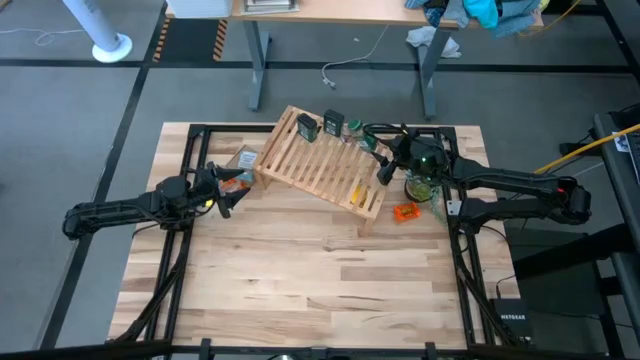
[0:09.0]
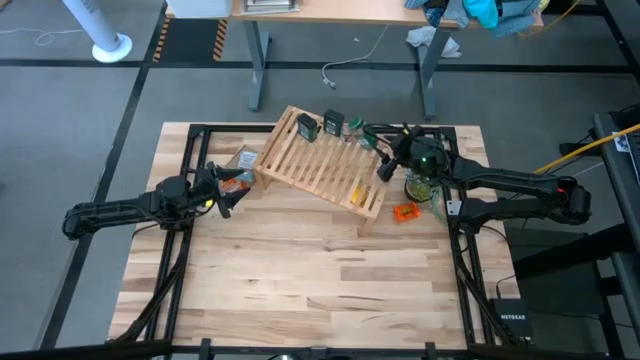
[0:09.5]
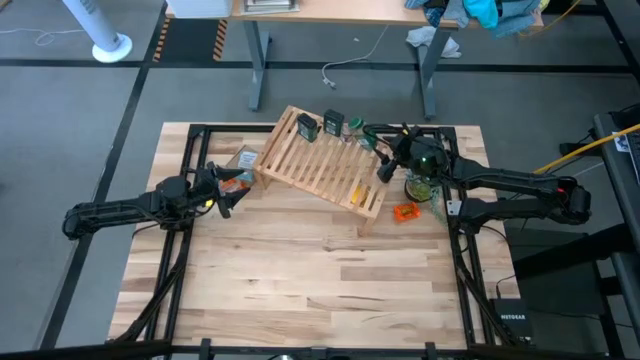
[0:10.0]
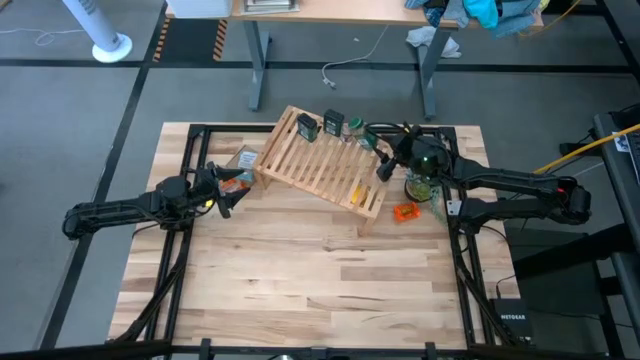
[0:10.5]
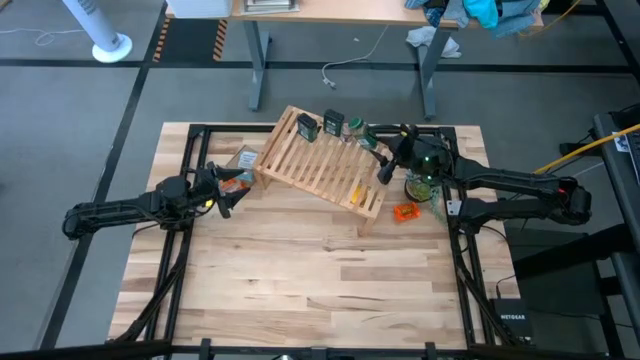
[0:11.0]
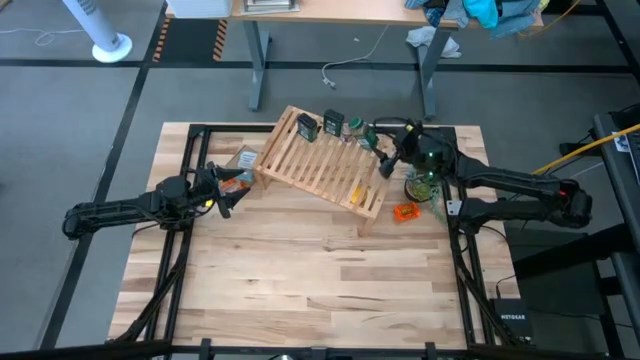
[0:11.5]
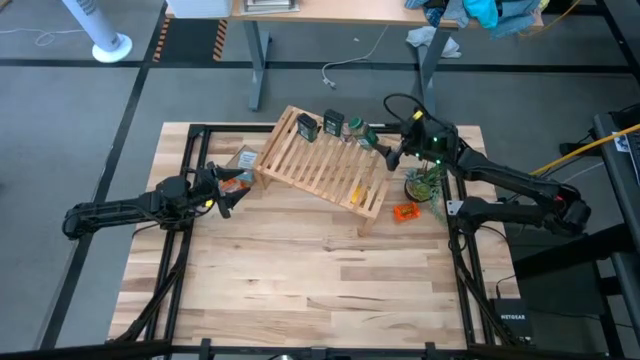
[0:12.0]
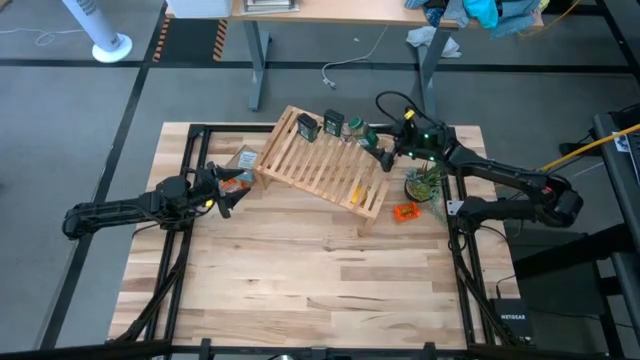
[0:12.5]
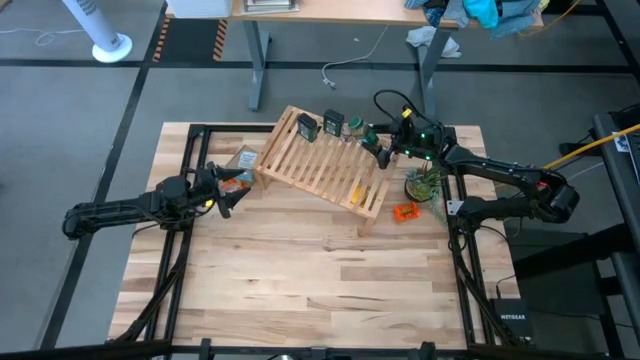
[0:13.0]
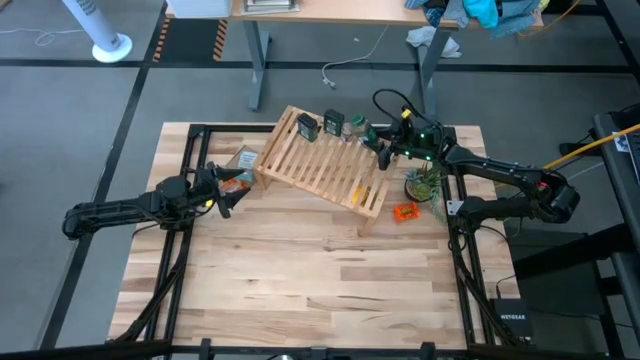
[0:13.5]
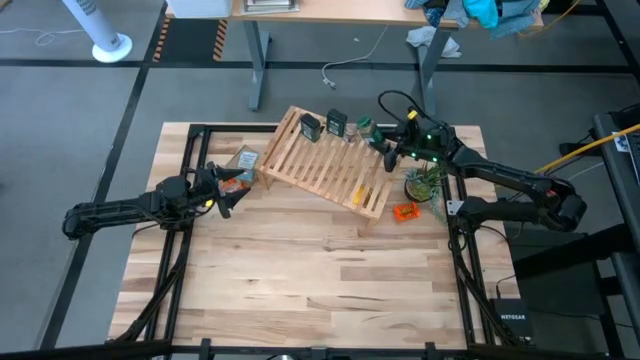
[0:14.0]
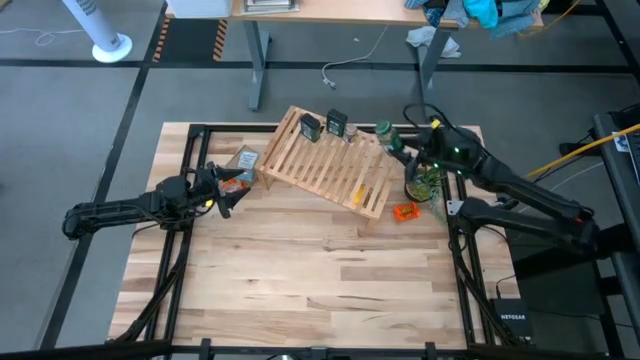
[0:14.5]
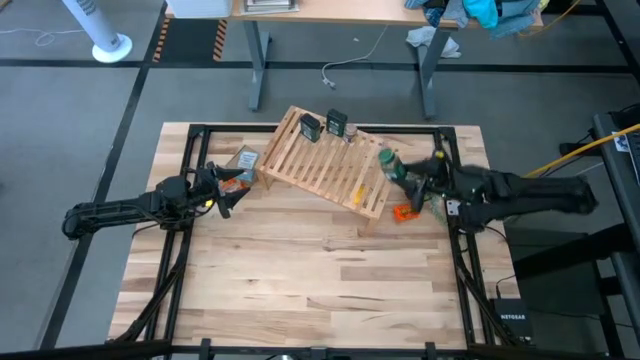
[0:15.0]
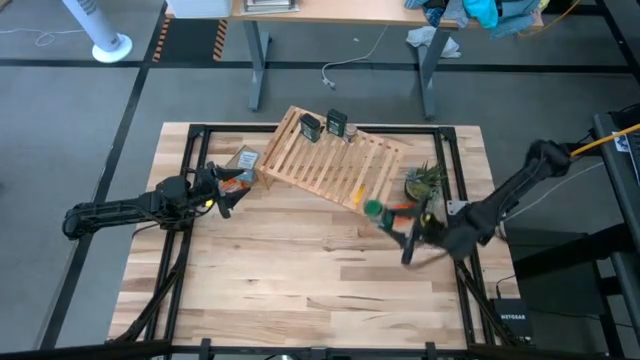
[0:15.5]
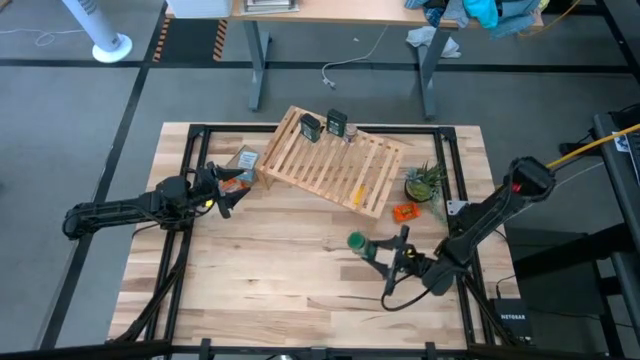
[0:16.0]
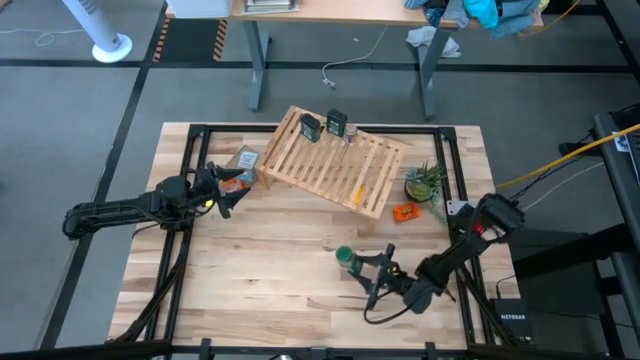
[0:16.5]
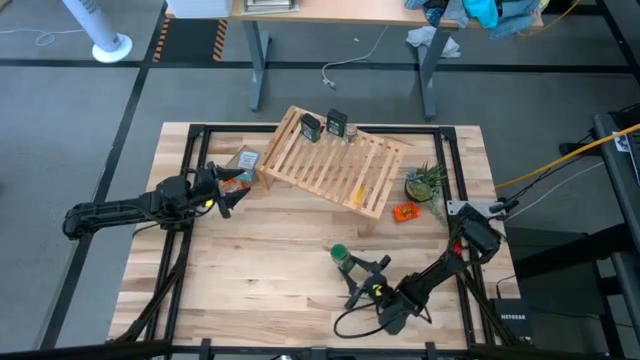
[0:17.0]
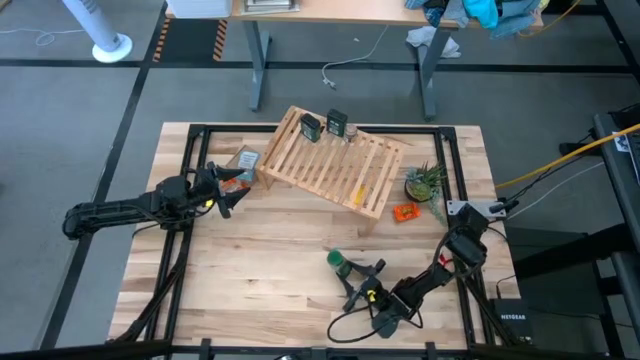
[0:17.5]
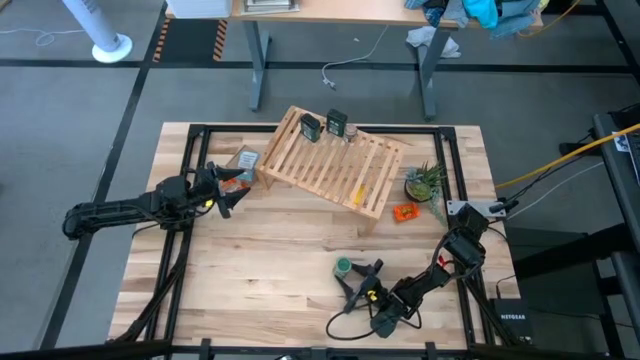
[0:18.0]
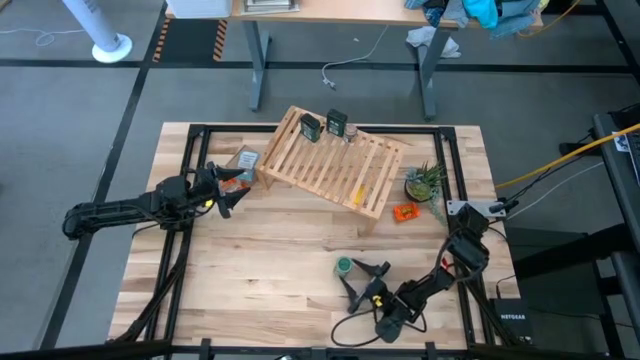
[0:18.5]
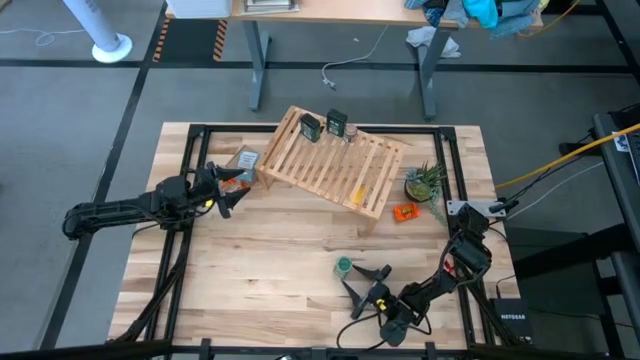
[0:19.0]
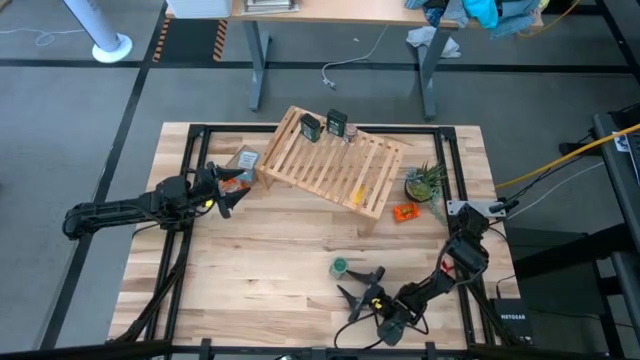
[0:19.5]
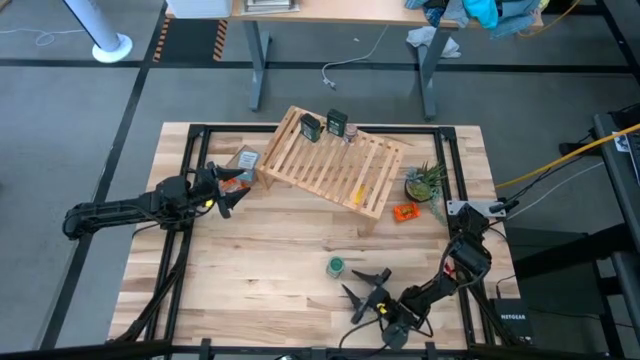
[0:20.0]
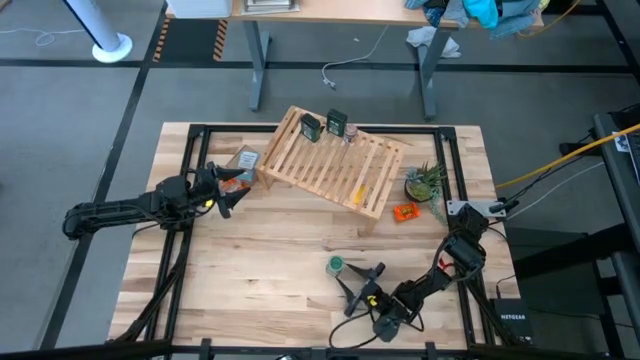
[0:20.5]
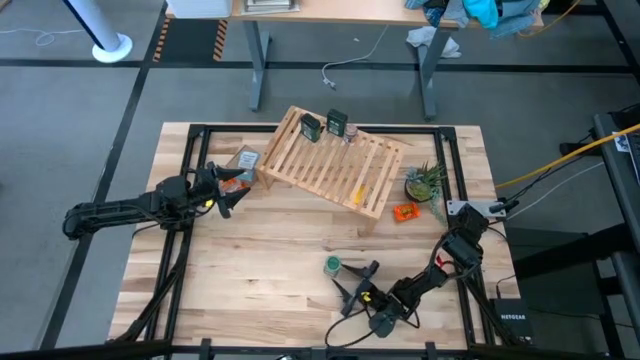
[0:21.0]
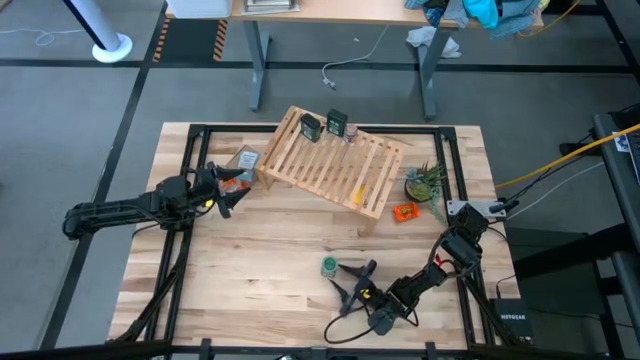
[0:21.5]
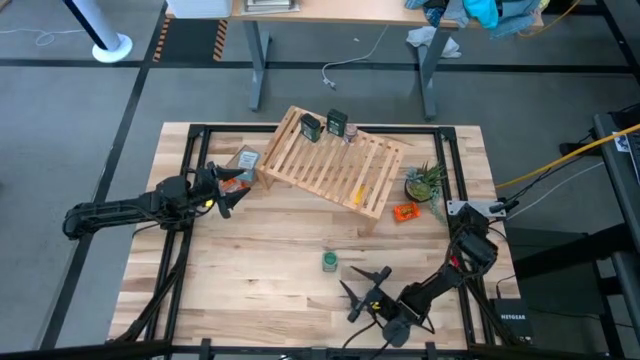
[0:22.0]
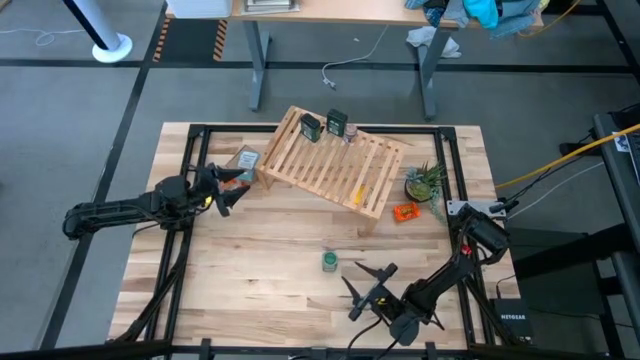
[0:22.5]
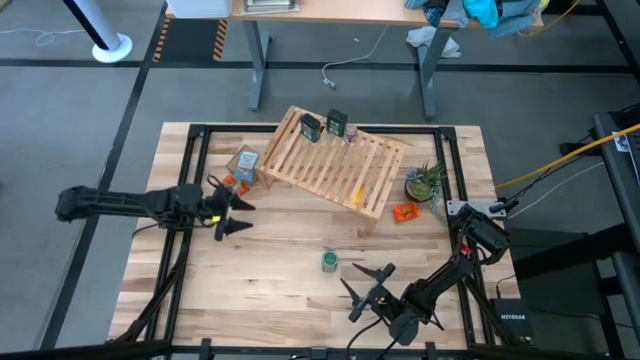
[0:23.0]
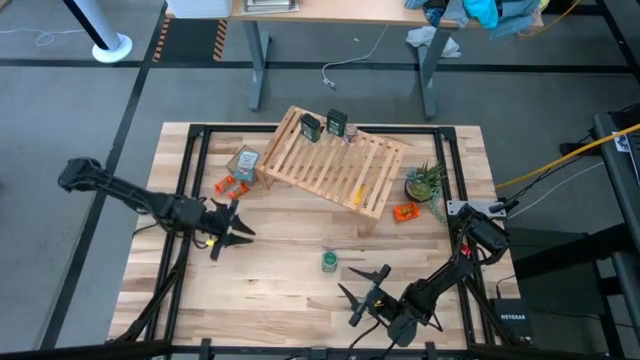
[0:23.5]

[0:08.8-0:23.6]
Task: Shelf spices
Remove the green seasoning bottle from the shelf

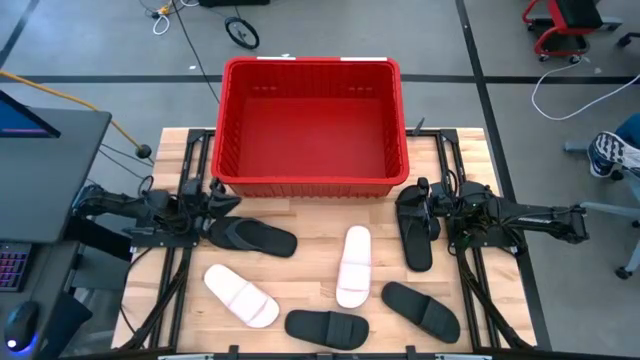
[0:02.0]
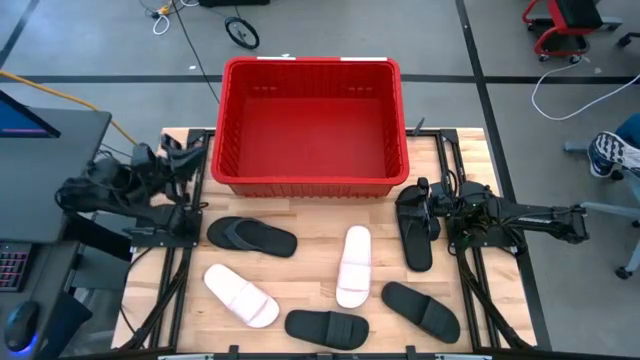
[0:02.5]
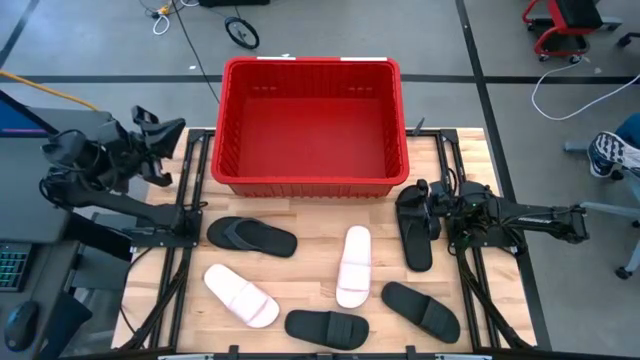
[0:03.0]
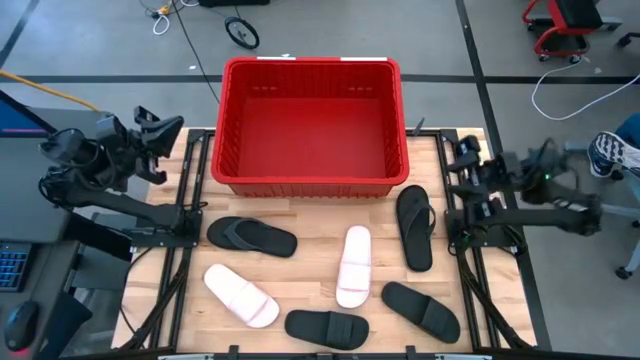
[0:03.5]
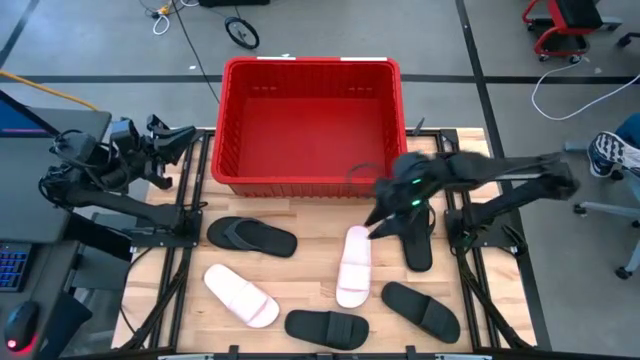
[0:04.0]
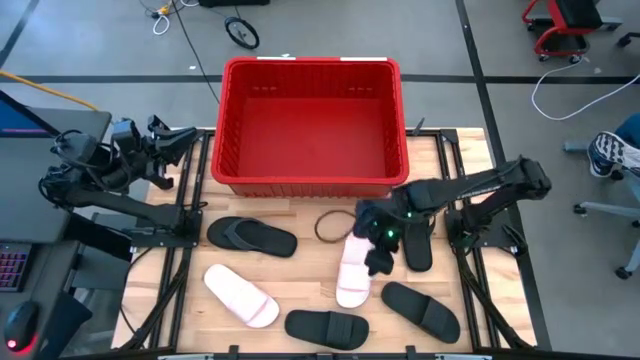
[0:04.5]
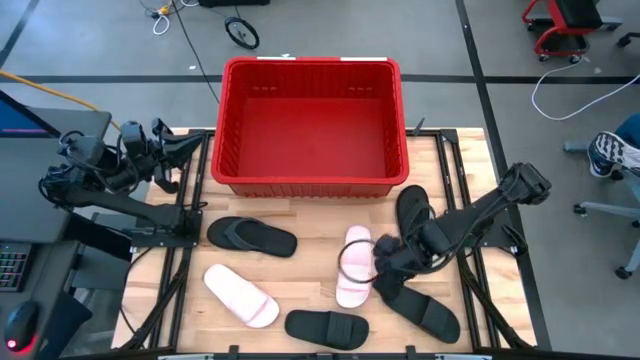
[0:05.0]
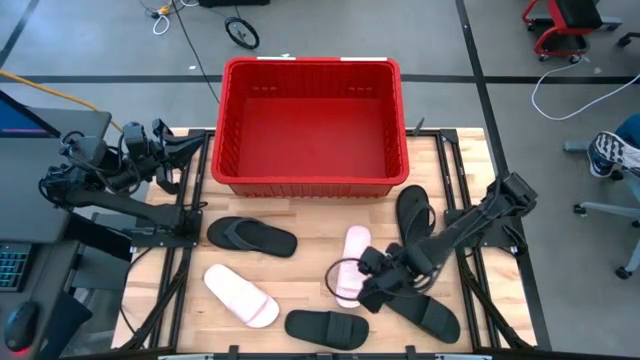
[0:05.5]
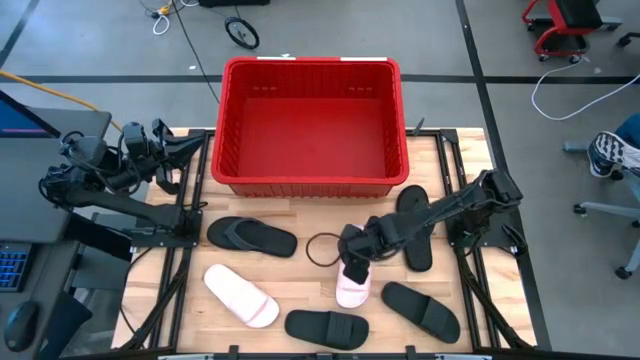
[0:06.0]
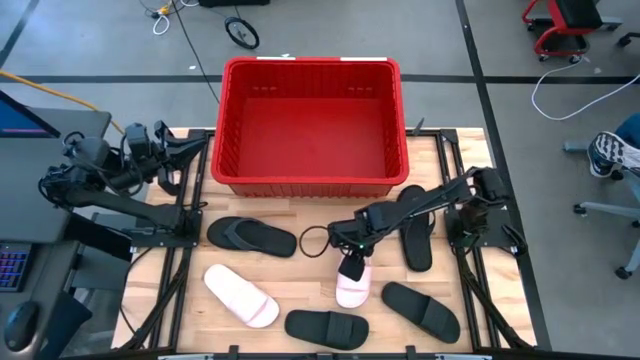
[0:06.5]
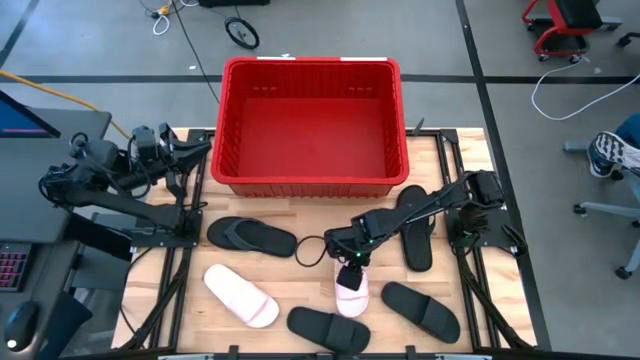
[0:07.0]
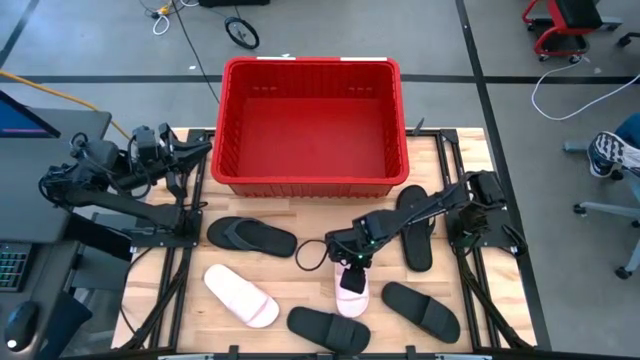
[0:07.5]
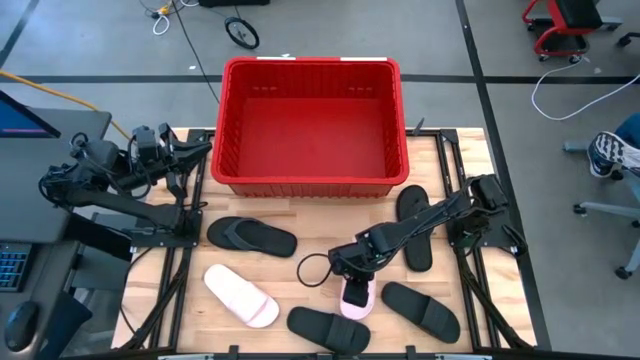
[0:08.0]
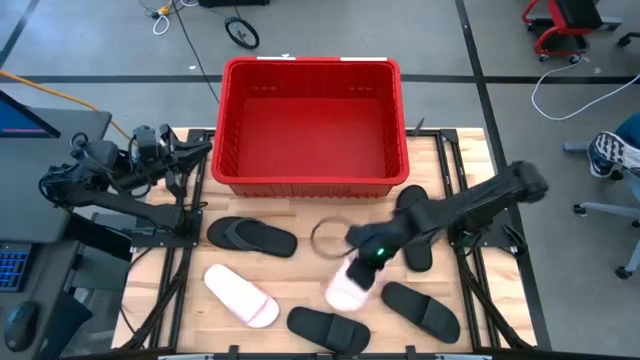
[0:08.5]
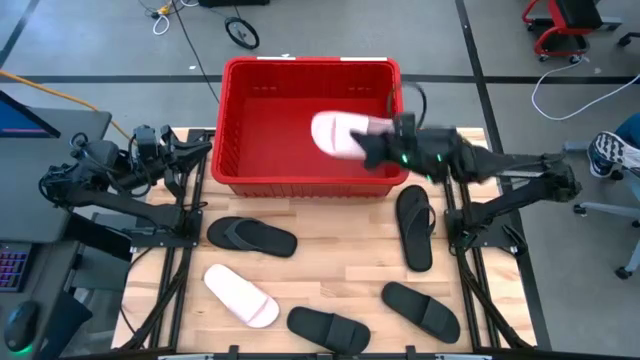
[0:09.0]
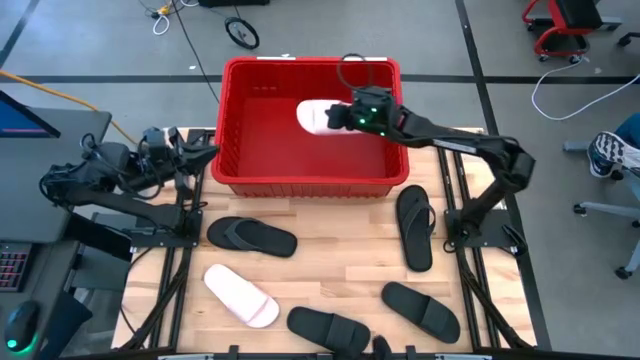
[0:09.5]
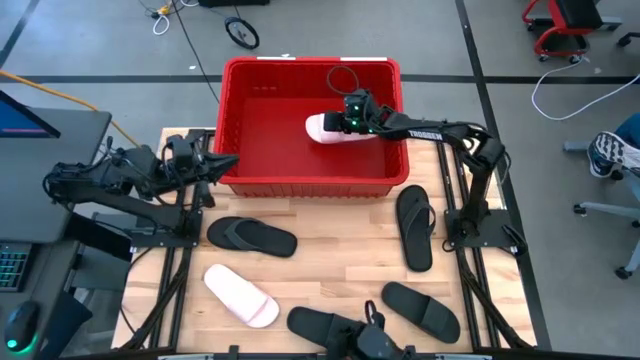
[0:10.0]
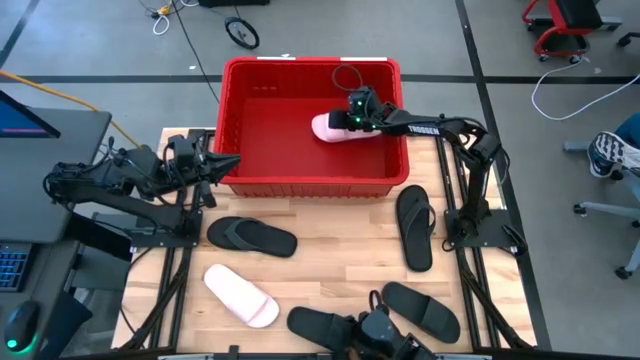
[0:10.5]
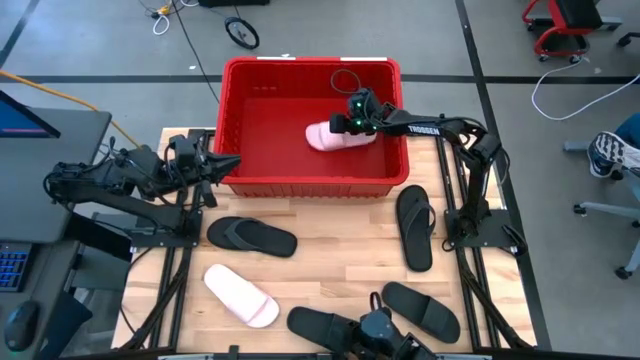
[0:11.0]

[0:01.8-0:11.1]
Task: Pick and place slides into bin
Put the pink slide into the red bin
